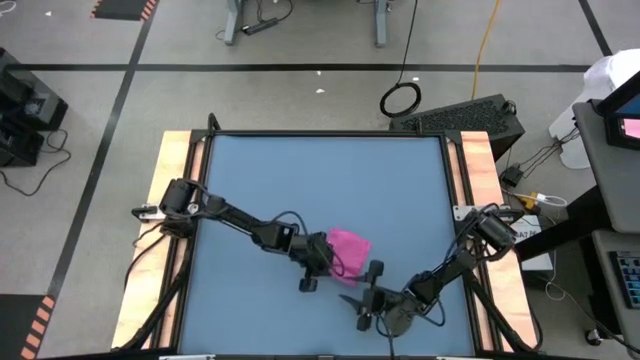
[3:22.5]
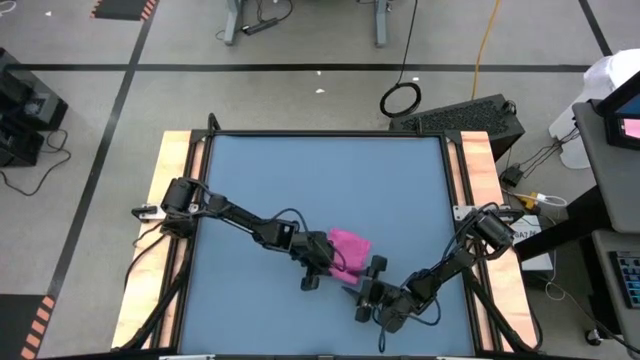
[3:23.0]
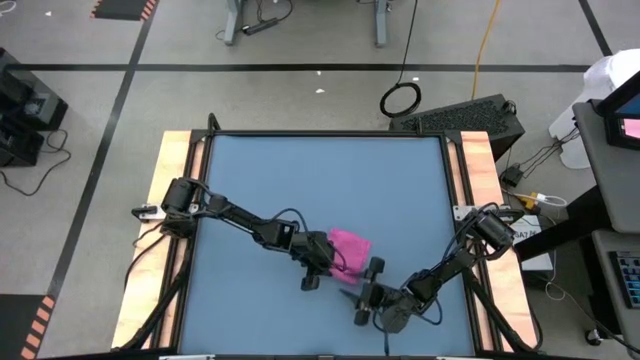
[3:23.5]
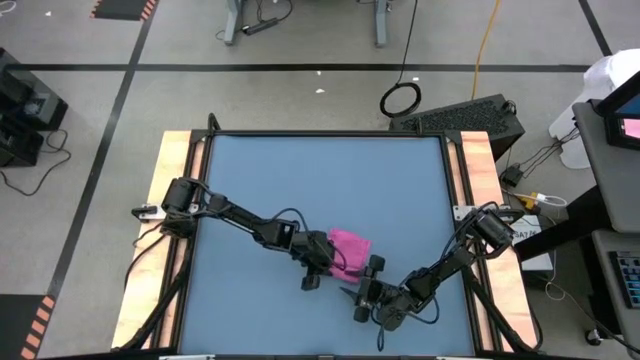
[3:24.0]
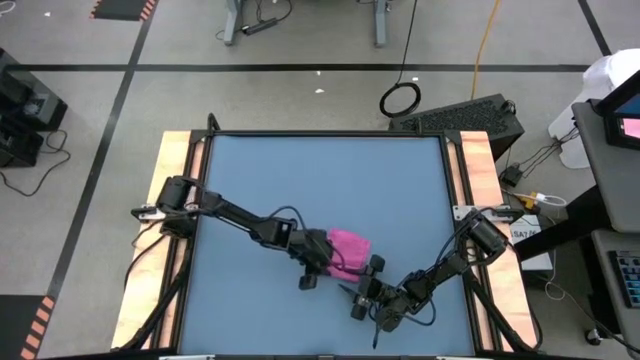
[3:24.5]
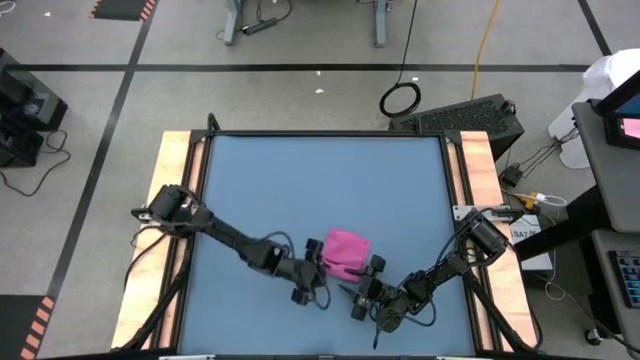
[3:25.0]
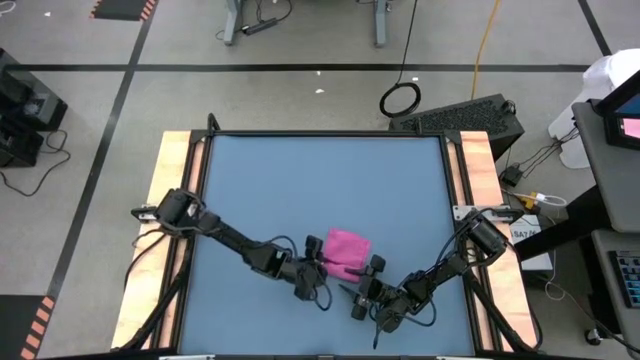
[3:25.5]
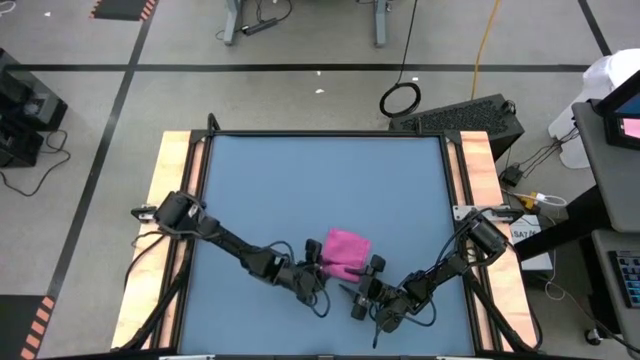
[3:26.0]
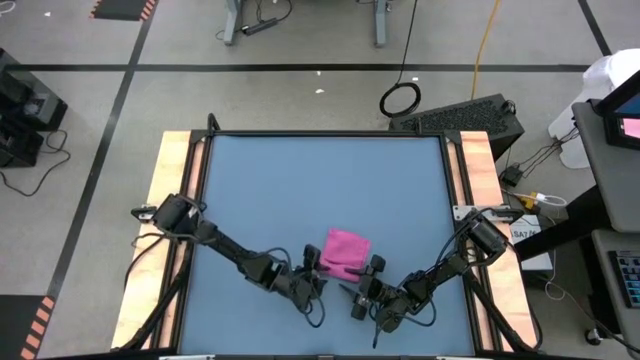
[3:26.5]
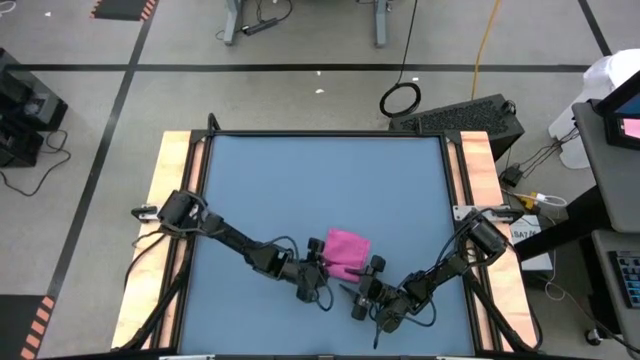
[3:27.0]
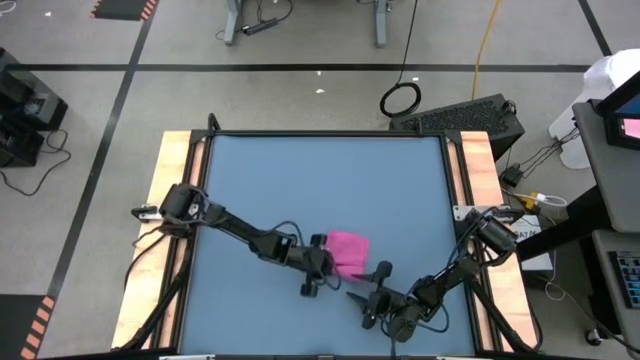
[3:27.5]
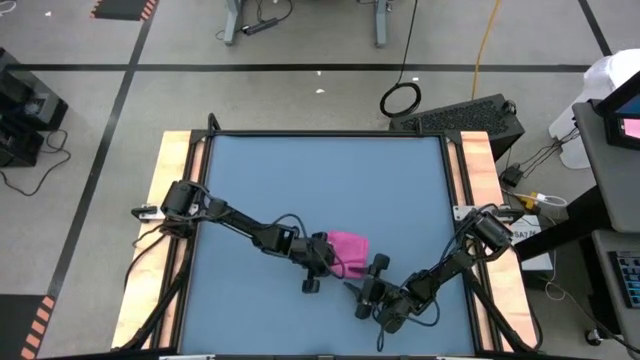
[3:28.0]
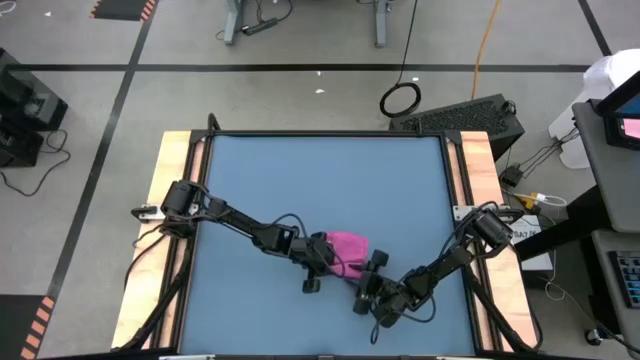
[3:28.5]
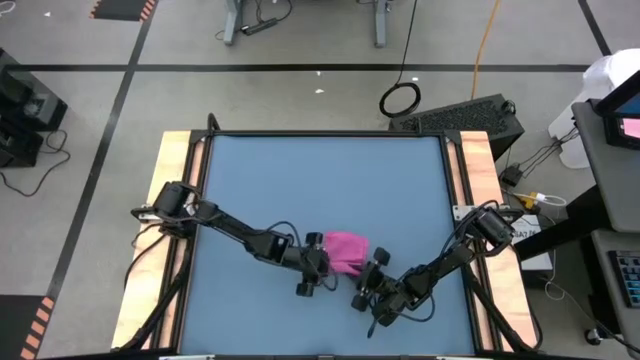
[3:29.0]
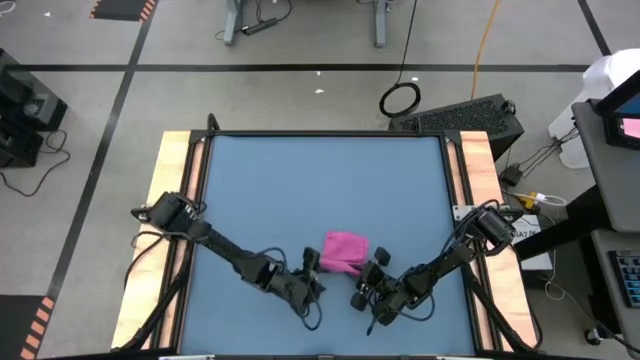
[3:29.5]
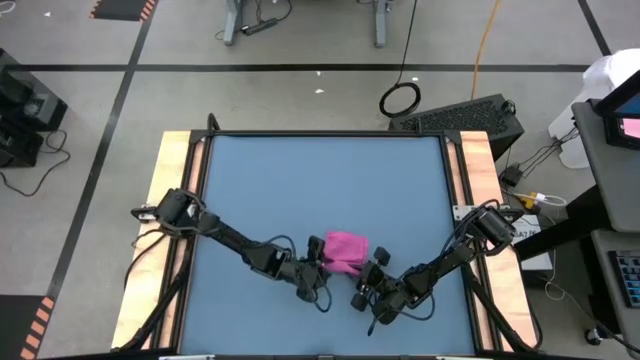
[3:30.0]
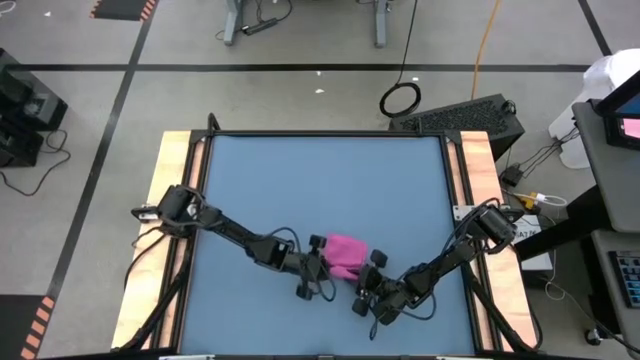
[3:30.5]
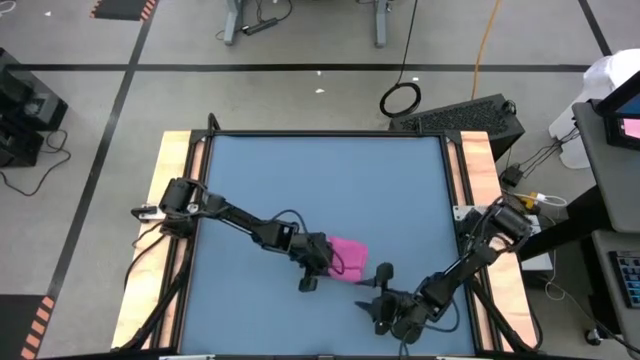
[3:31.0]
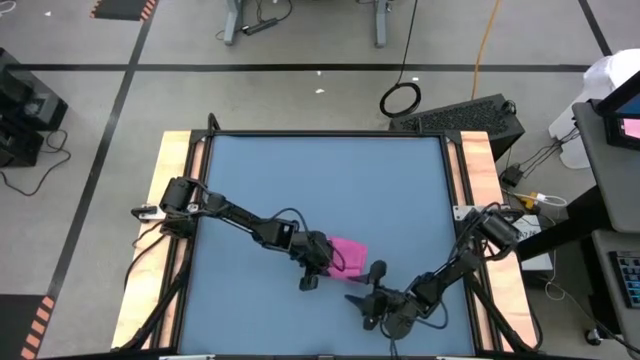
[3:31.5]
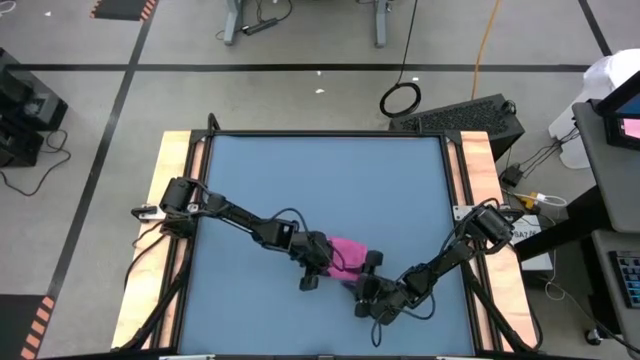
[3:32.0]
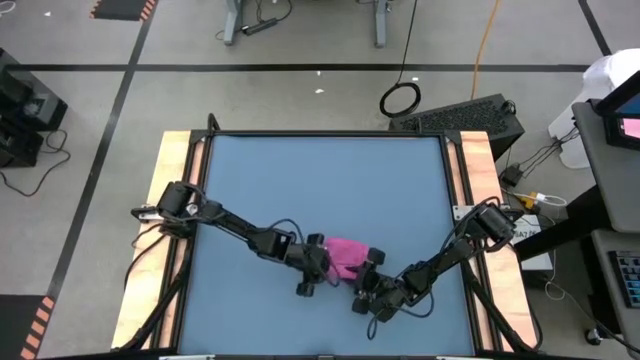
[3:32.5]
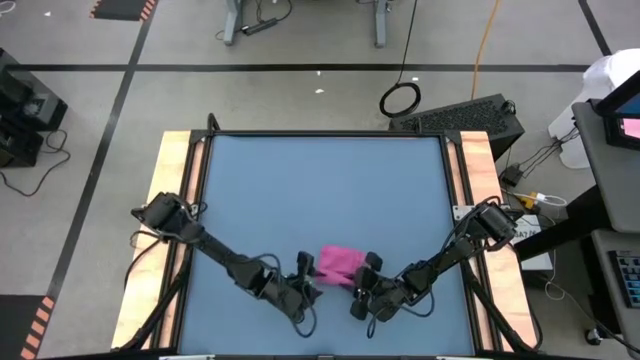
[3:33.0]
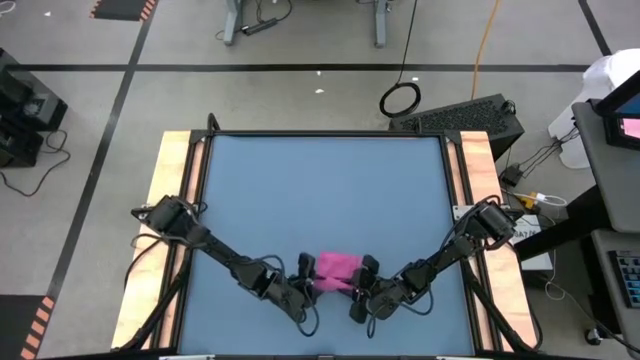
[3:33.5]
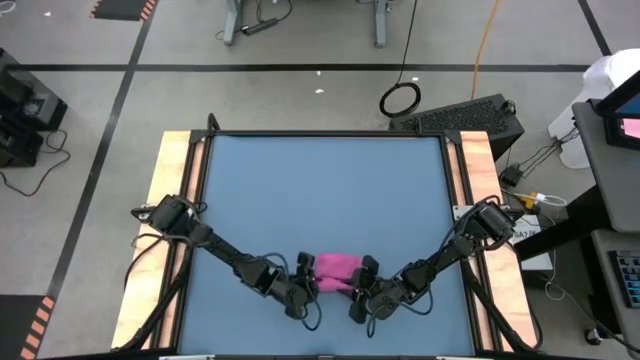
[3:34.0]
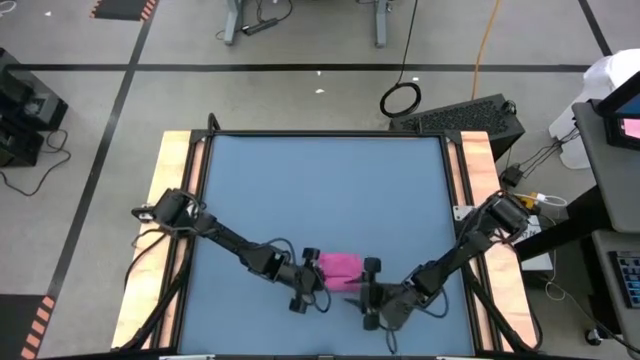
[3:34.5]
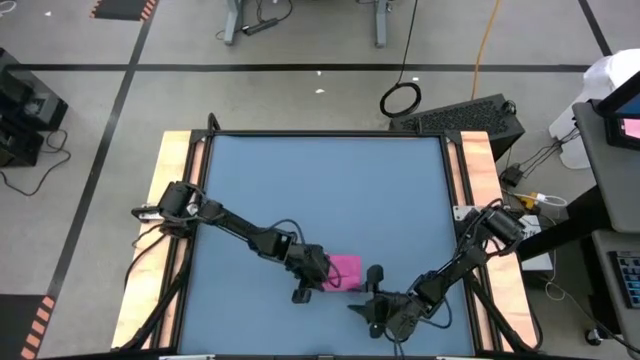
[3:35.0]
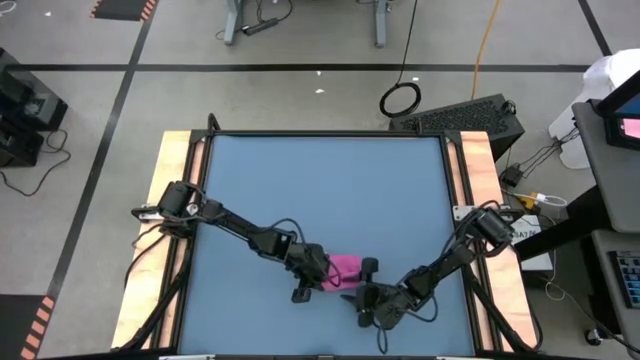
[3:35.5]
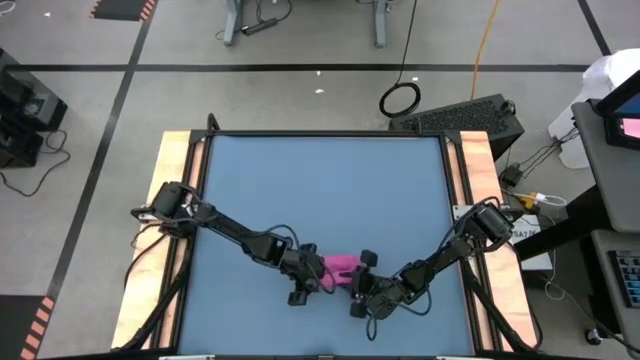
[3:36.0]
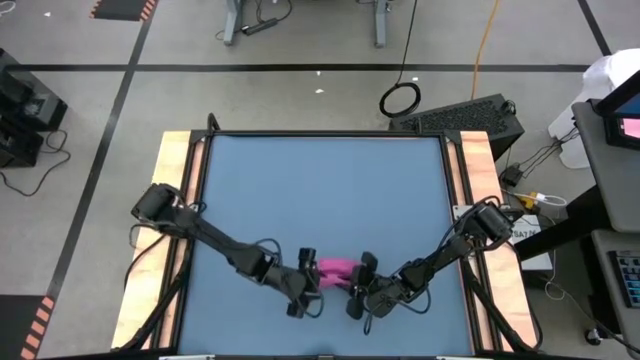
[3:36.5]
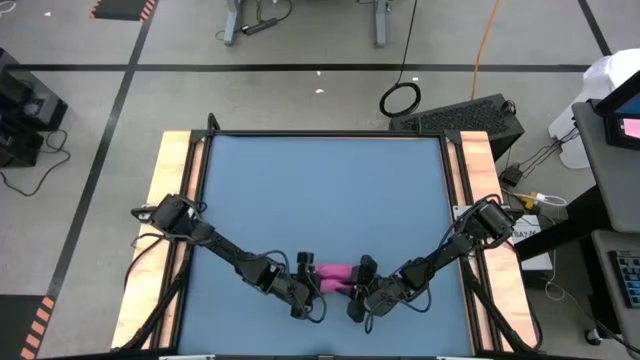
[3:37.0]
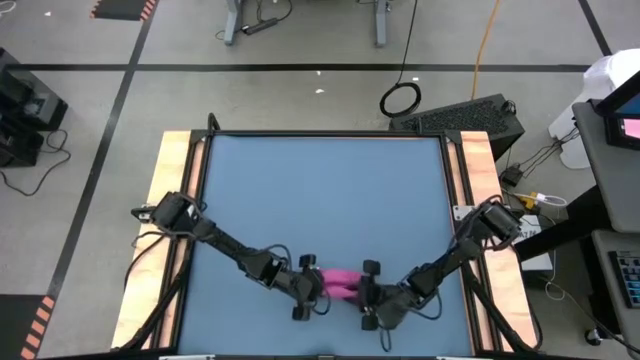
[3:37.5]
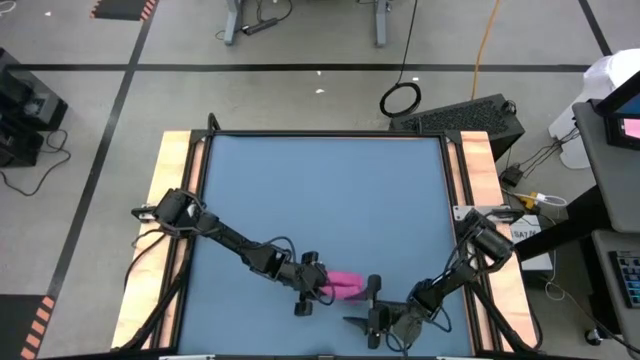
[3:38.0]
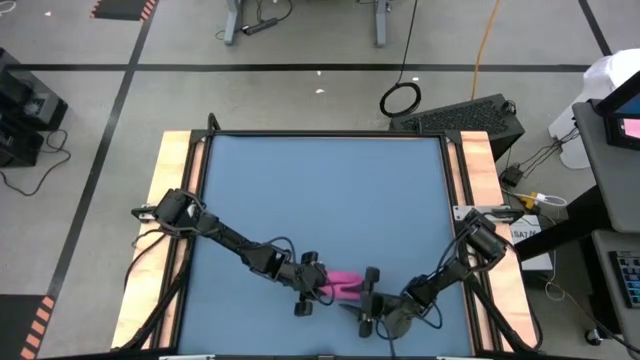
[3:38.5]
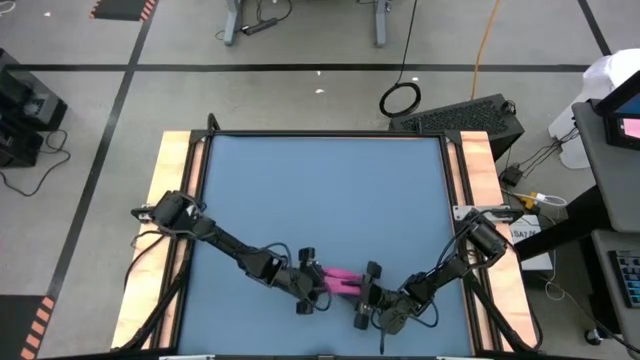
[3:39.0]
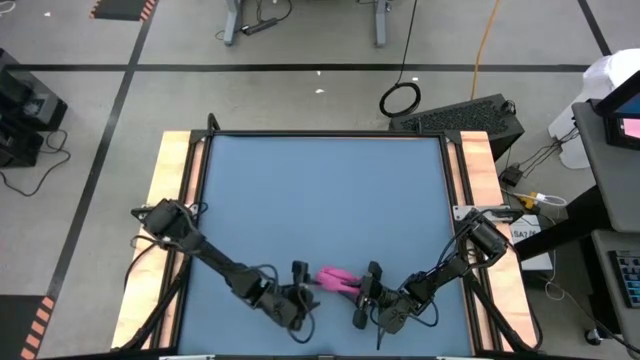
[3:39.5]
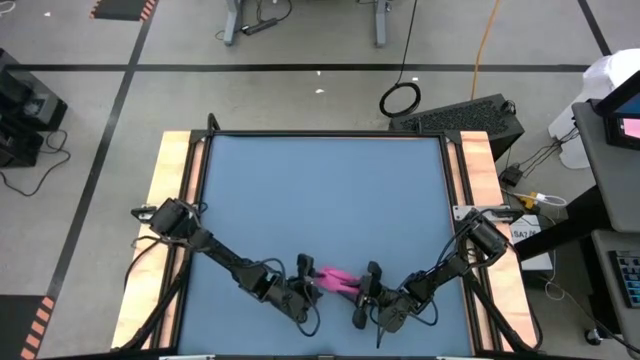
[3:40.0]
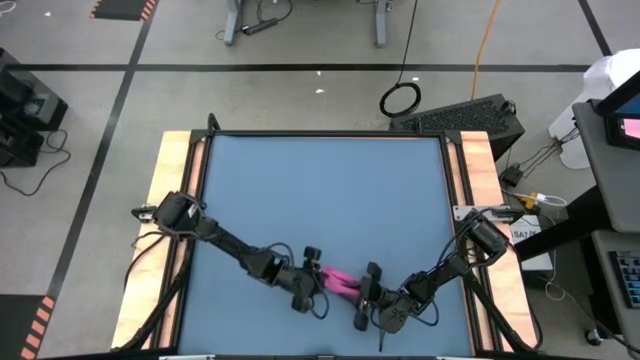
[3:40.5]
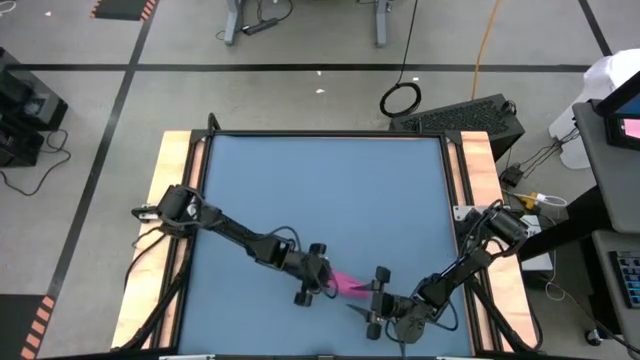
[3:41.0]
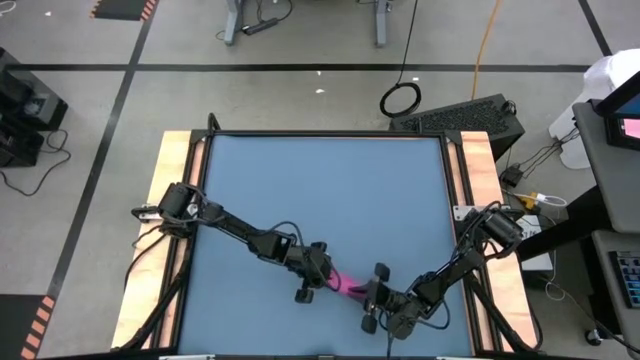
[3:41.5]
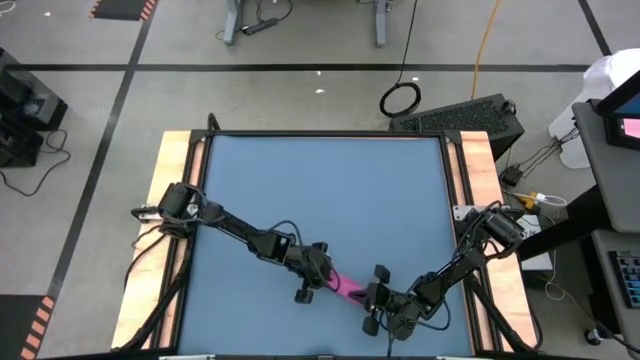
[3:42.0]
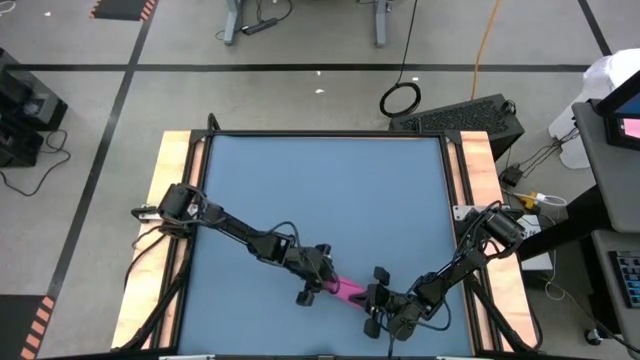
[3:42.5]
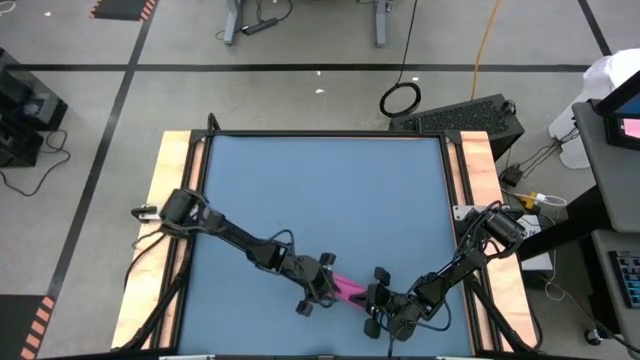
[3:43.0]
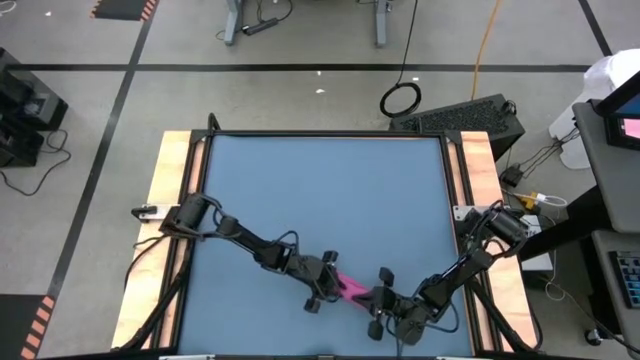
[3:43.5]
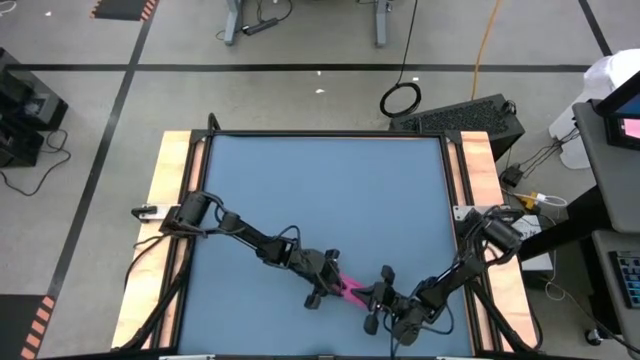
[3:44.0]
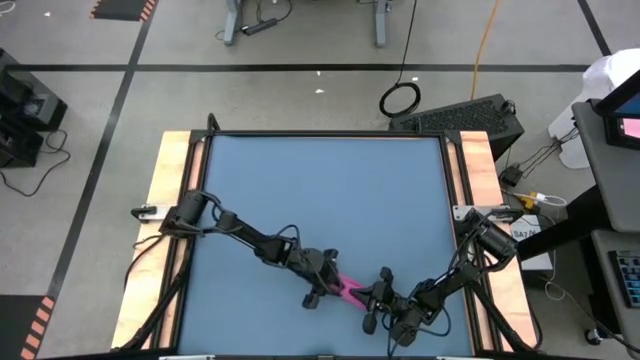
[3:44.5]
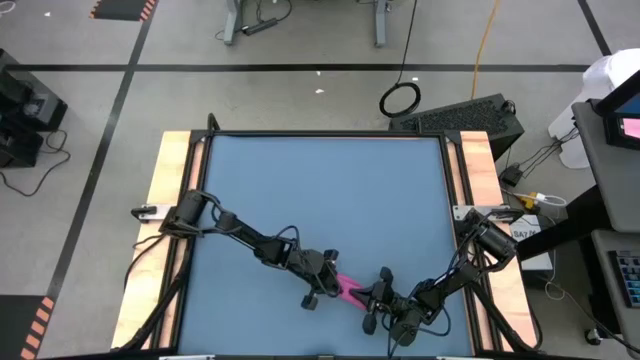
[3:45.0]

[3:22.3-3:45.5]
Task: Roll towel into tight, uniform cylinder
Roll the pink towel
